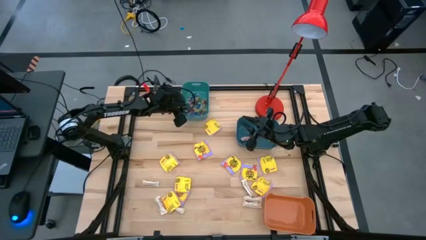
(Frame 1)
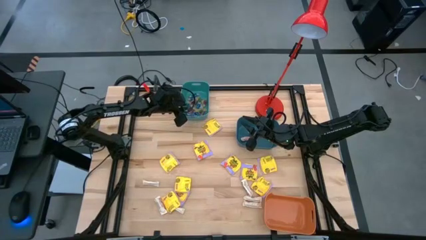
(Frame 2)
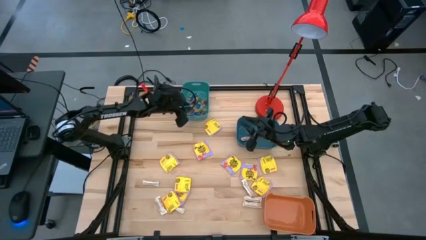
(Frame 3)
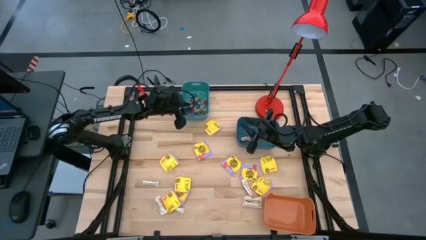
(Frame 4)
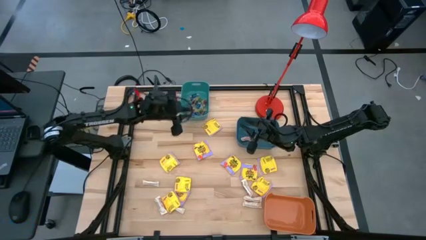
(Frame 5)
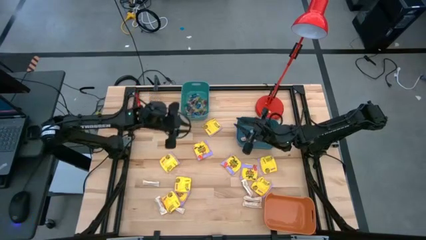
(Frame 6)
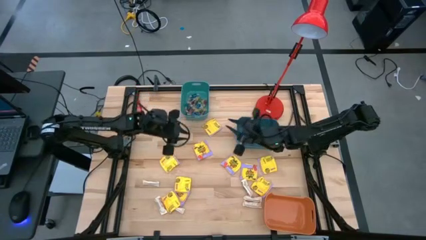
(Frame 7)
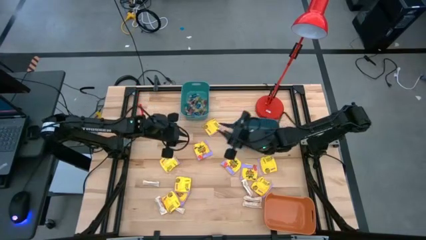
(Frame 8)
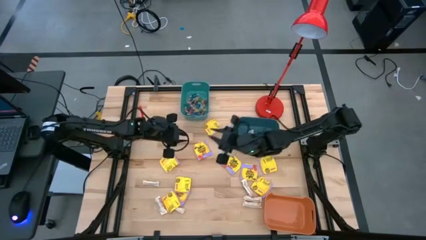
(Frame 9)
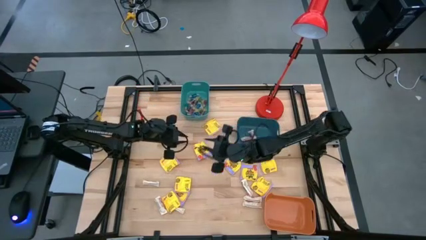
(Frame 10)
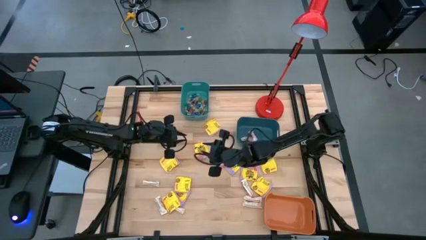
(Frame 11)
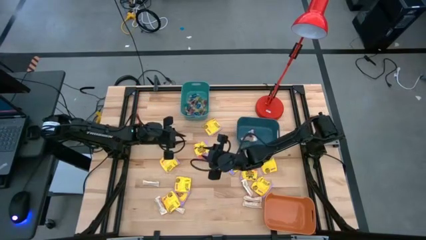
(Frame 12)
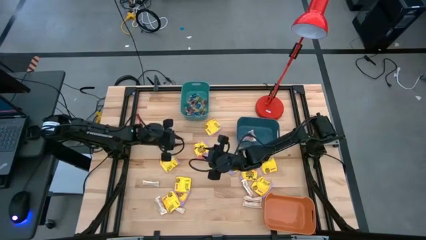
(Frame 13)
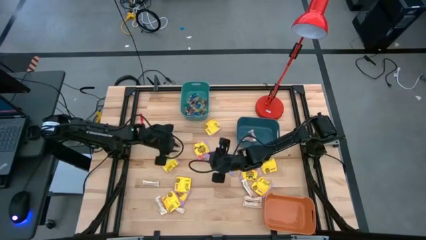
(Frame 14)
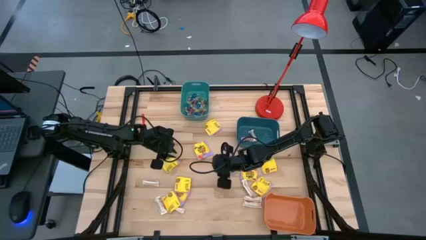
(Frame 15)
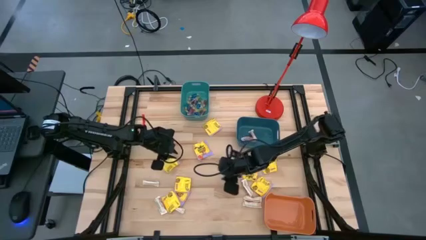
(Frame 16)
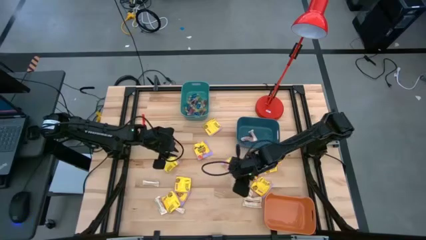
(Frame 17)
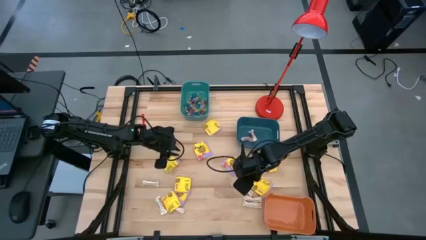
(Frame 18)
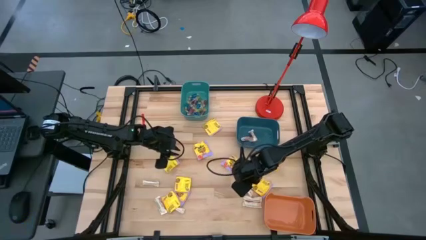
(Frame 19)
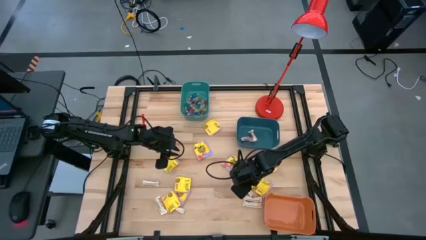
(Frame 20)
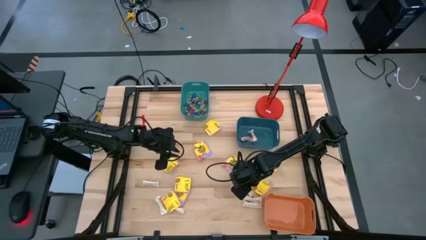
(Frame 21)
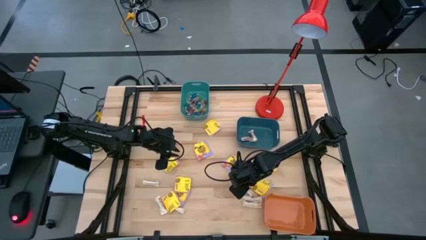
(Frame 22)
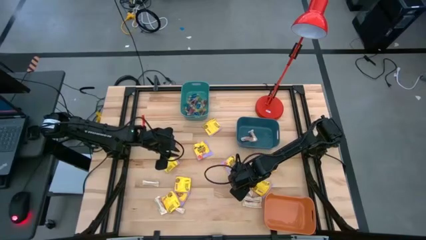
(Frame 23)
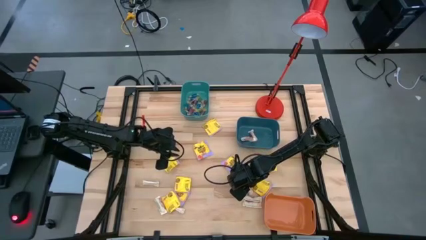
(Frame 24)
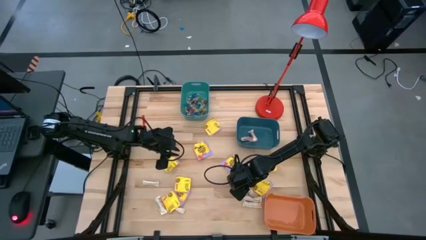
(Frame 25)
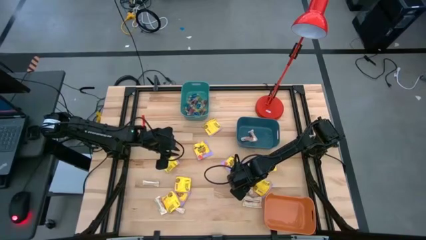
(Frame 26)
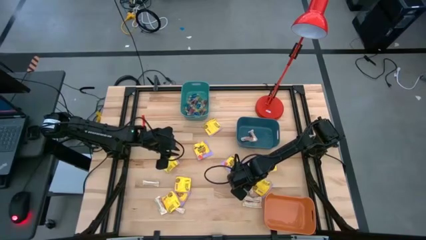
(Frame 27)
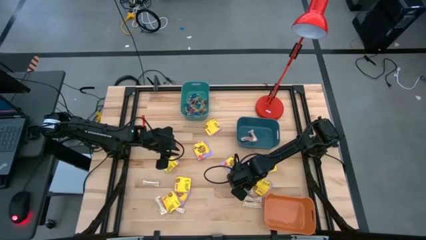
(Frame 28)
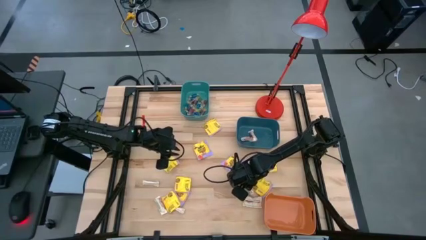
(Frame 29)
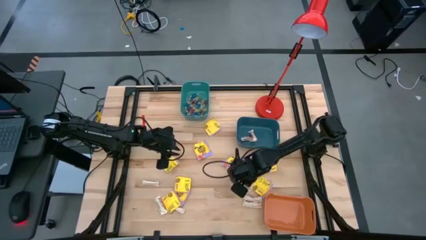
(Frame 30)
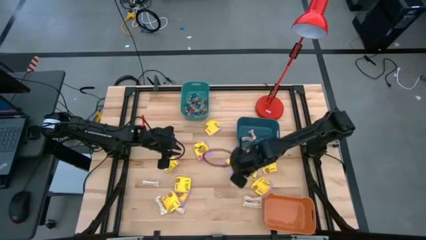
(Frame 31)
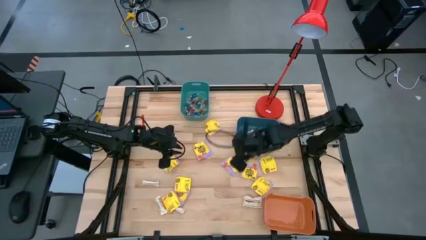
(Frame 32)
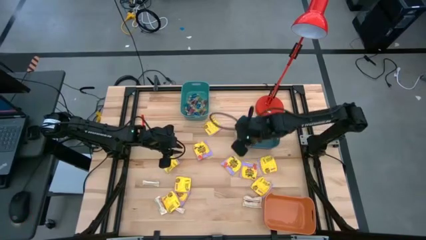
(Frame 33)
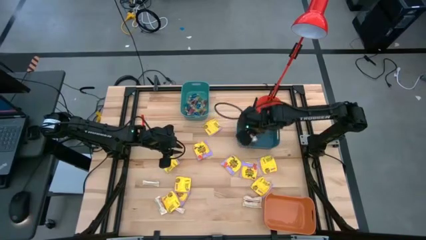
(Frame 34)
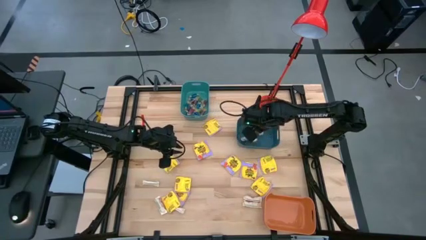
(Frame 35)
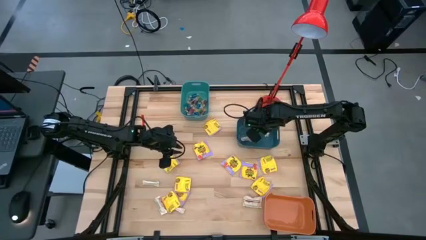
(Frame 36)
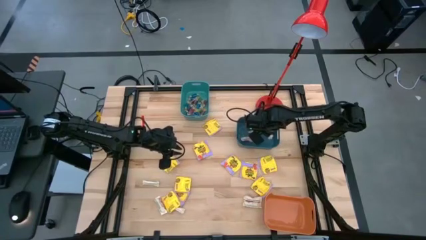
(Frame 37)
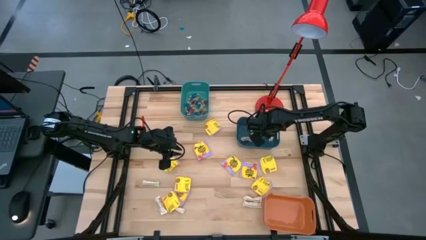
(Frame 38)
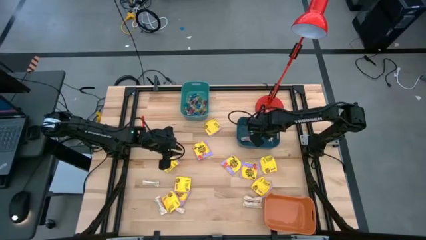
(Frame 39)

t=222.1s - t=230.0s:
Task: Sort candy
Put the white chocolate bar into the blue bin

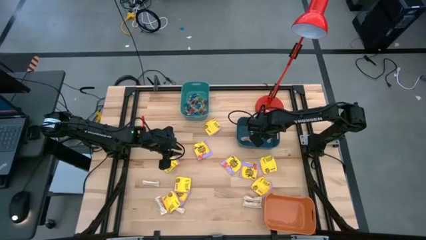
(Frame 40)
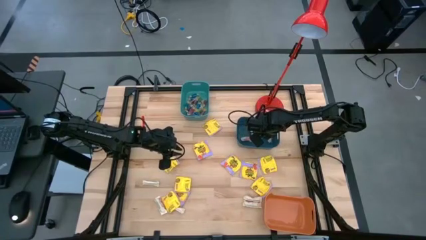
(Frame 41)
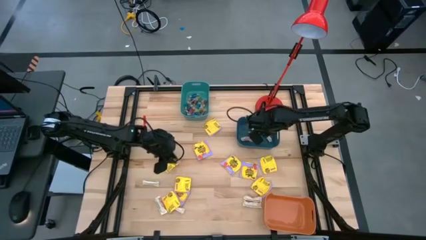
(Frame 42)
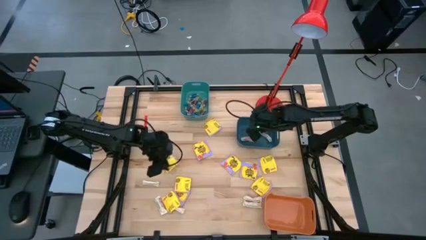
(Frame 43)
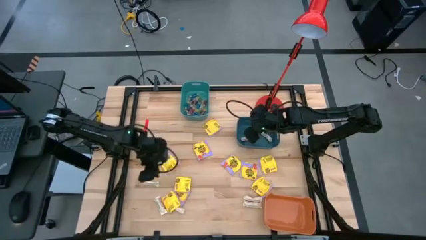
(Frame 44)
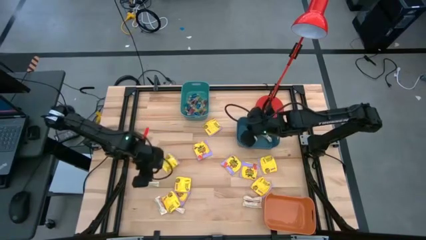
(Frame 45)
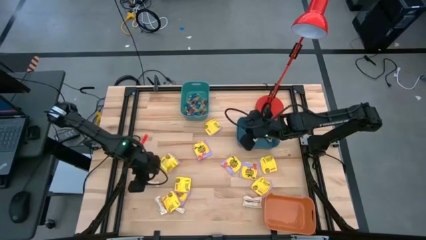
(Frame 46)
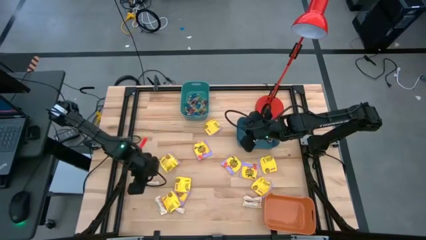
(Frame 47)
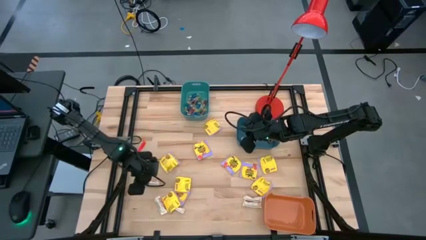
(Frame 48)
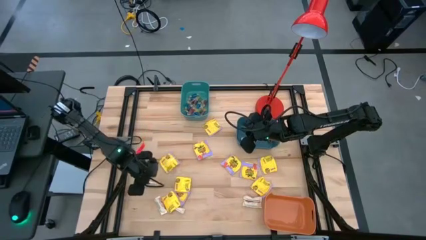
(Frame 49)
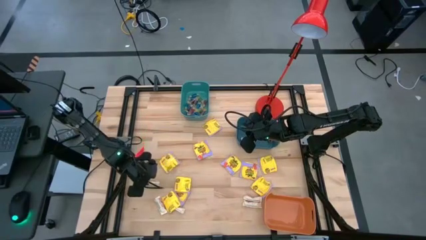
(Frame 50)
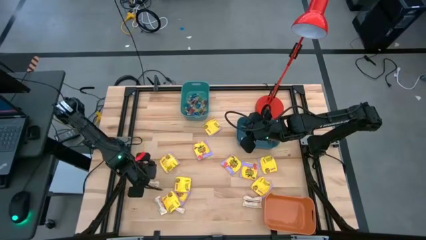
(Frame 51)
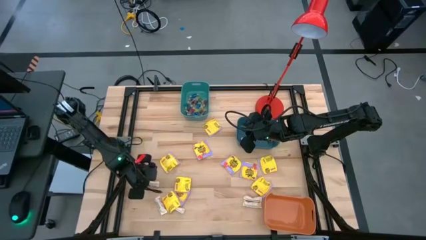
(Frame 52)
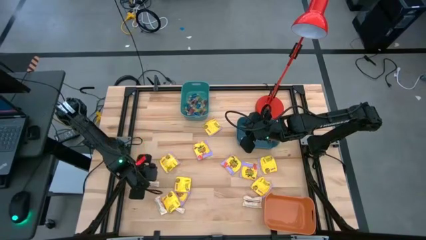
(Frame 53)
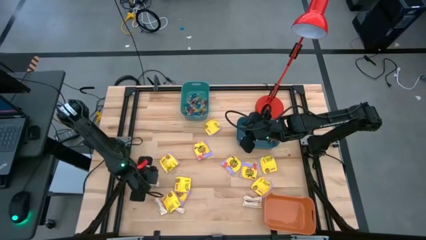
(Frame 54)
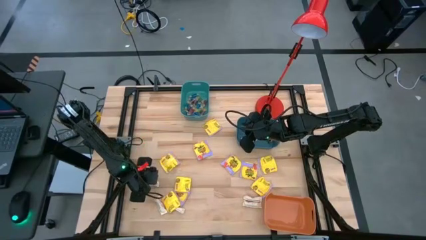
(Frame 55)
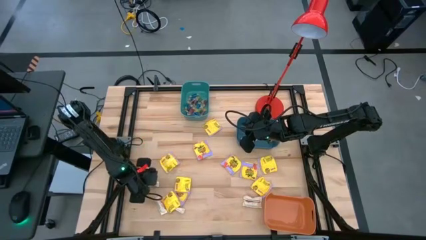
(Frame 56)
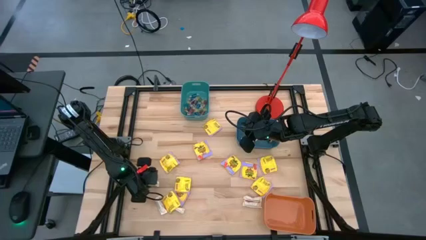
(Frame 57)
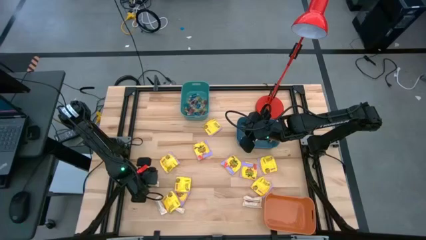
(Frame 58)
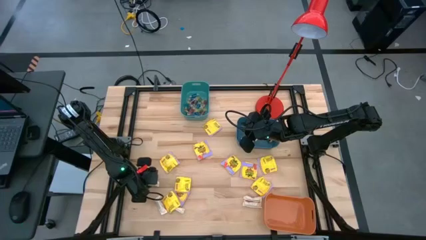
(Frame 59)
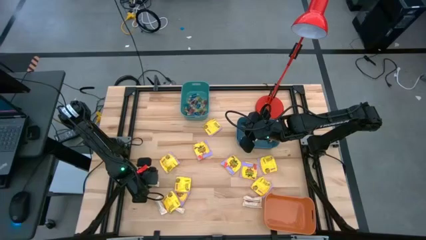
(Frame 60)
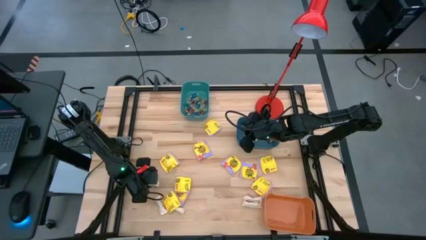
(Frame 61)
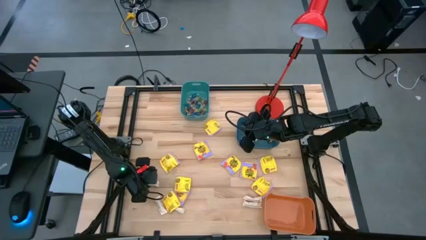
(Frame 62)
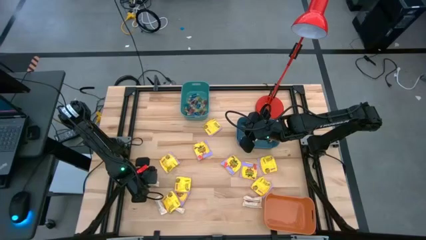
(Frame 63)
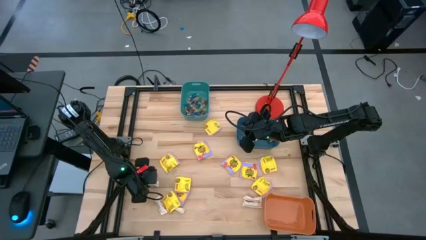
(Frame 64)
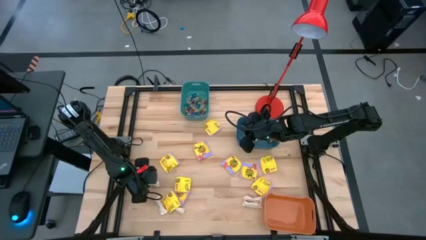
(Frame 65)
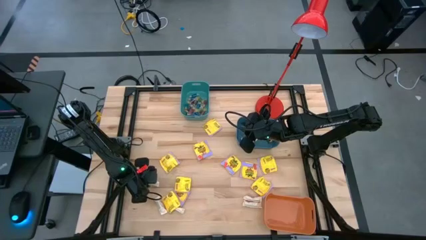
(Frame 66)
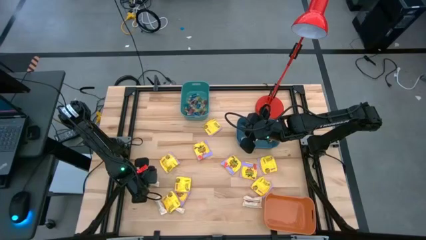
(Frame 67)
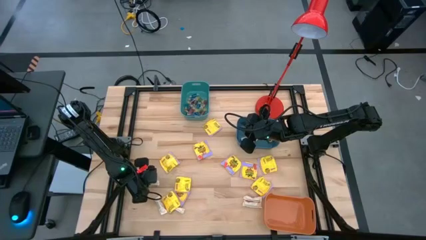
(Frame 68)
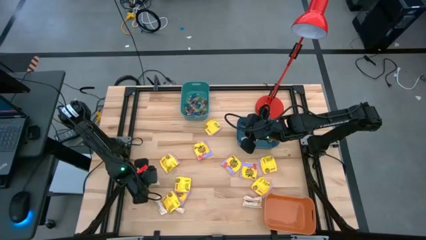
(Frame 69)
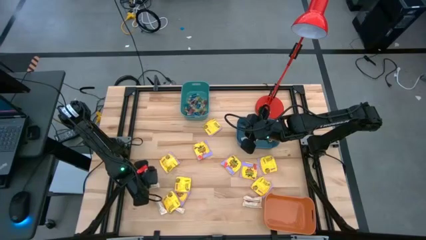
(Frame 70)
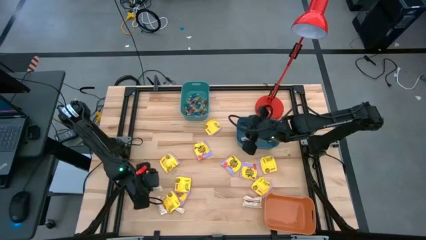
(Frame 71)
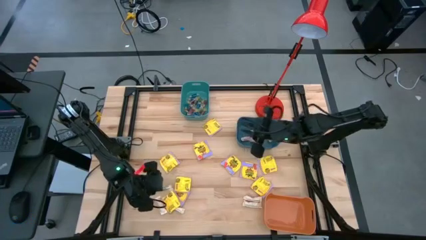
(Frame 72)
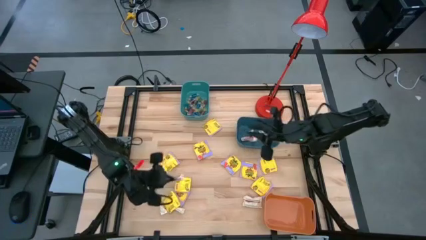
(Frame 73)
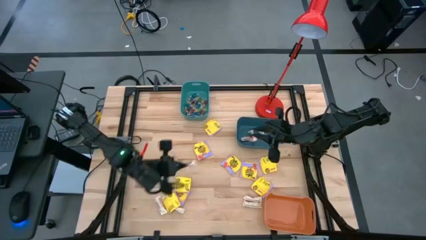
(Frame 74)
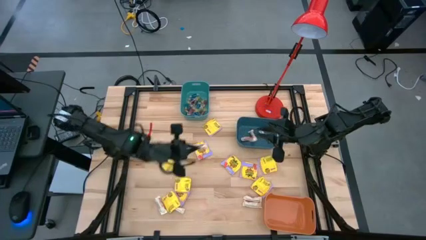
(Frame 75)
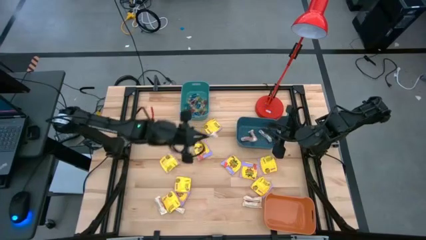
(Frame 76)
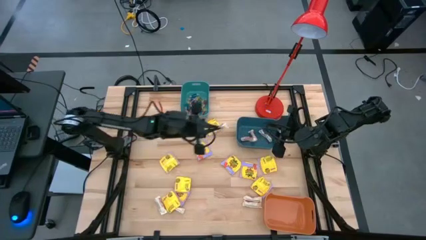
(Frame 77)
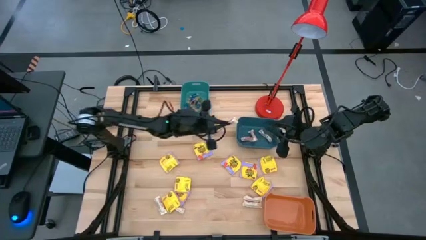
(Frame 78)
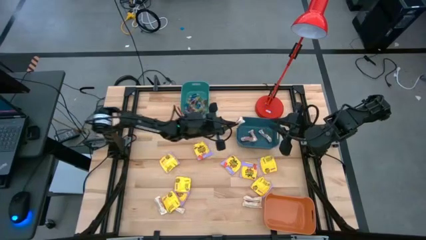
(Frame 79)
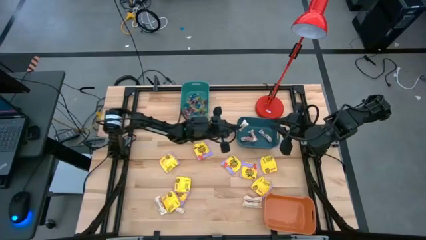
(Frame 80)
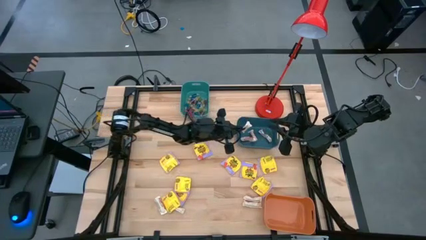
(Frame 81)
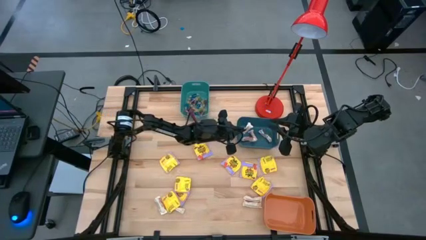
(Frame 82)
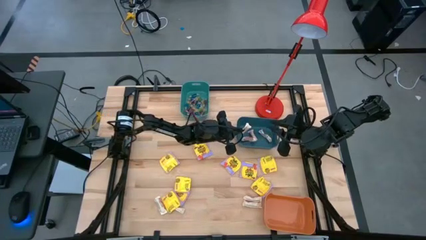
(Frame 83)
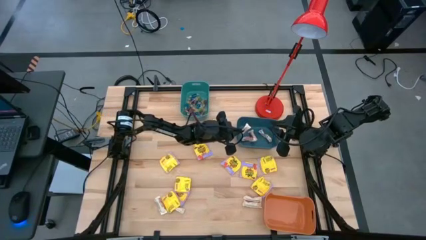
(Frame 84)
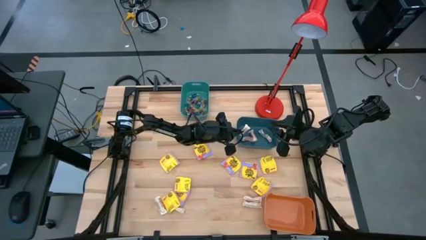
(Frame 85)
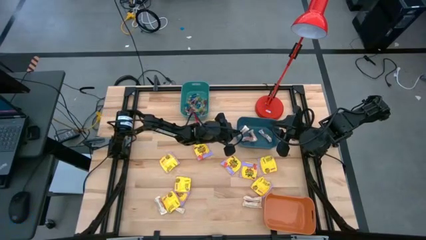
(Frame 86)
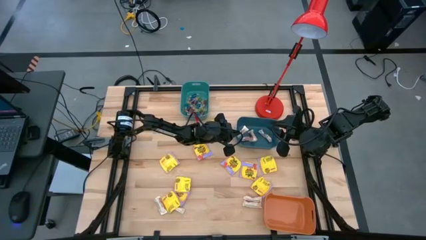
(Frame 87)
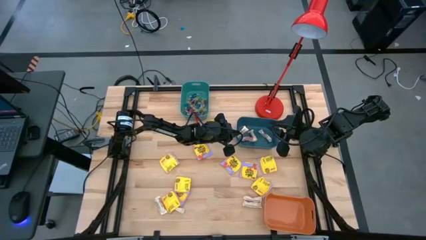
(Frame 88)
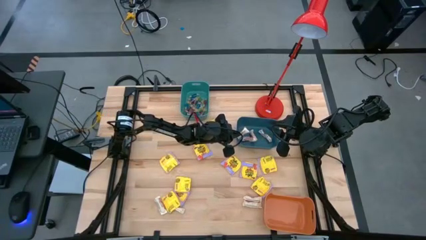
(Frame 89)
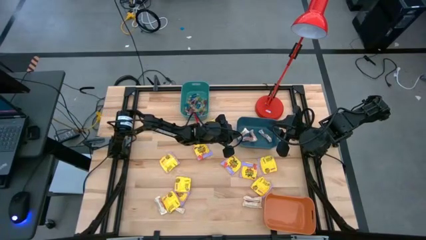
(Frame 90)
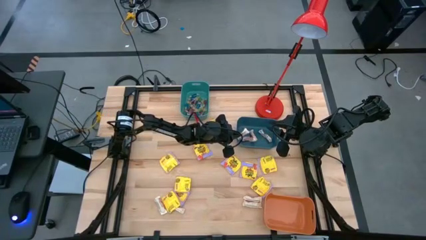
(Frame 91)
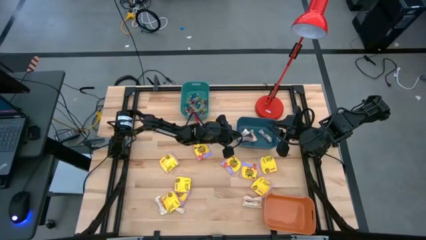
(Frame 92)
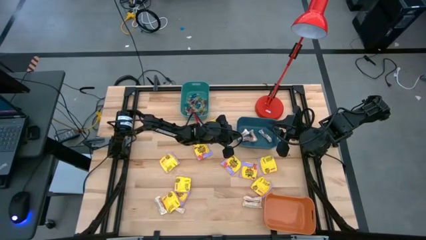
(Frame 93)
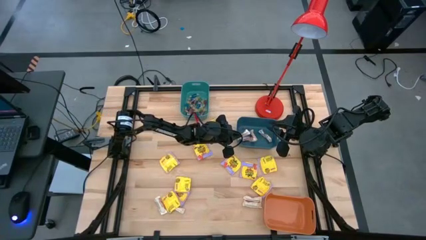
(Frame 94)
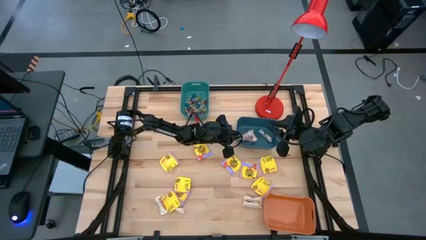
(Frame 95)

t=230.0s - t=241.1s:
Put the white chocolate bar into the blue bin
